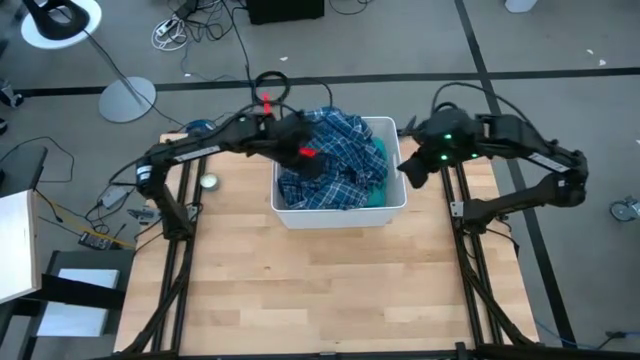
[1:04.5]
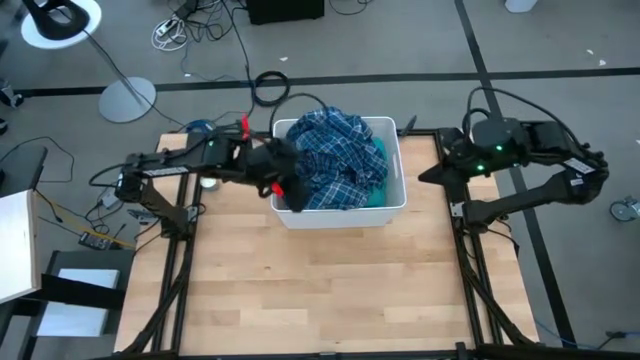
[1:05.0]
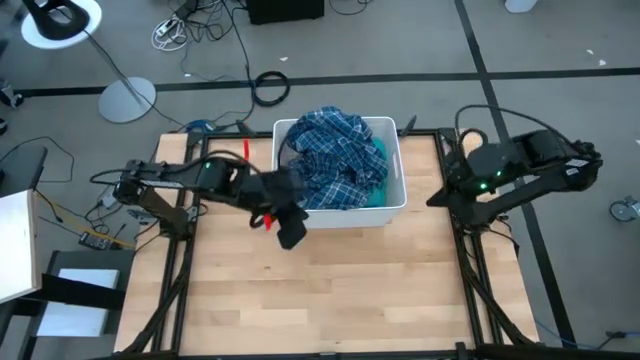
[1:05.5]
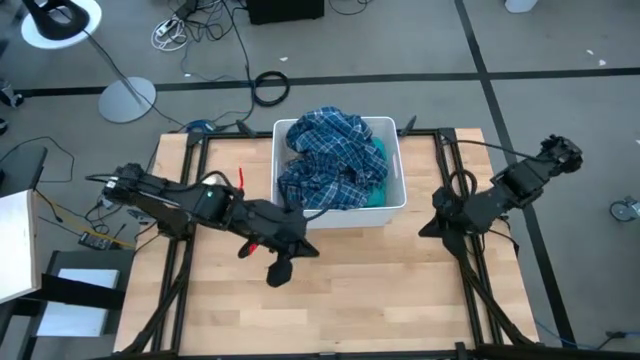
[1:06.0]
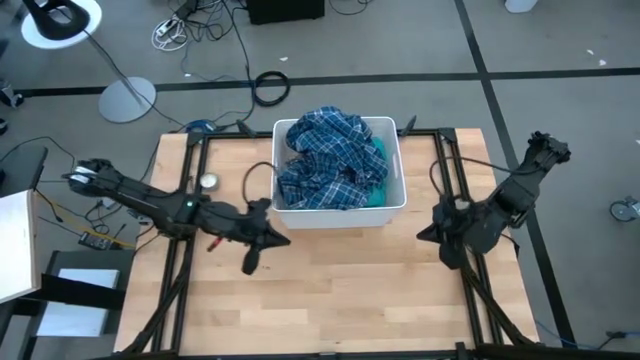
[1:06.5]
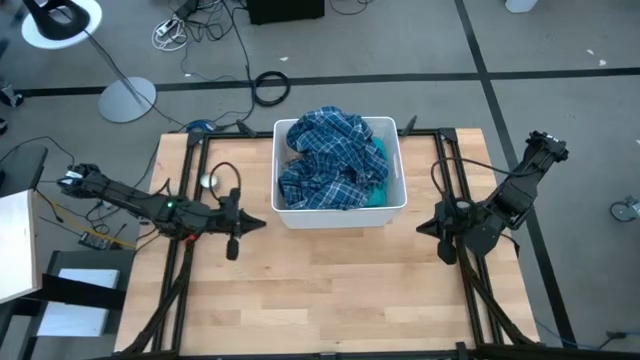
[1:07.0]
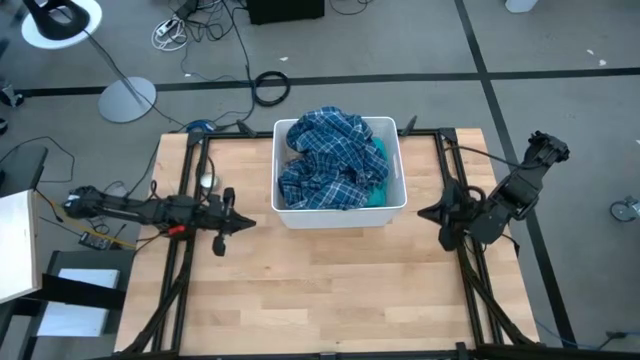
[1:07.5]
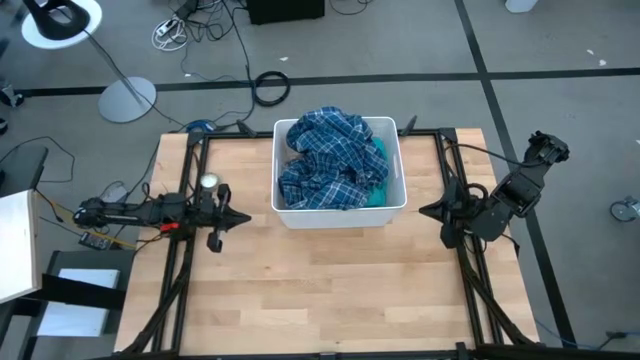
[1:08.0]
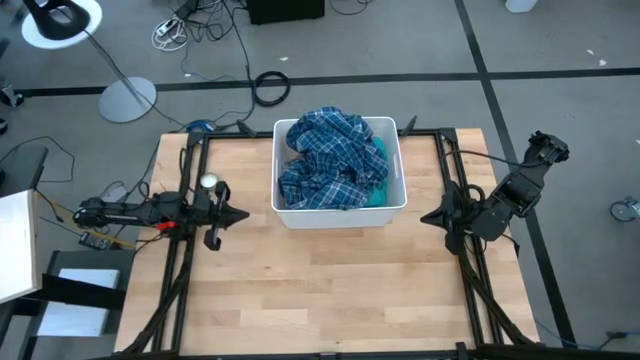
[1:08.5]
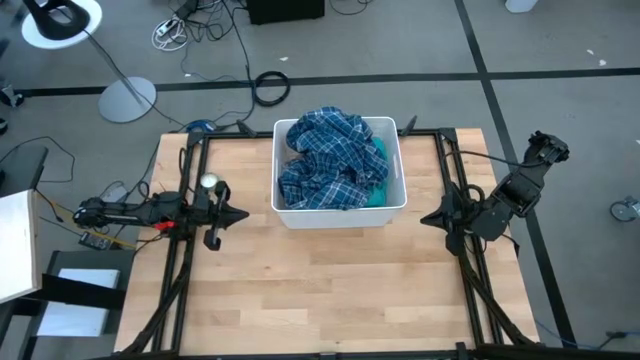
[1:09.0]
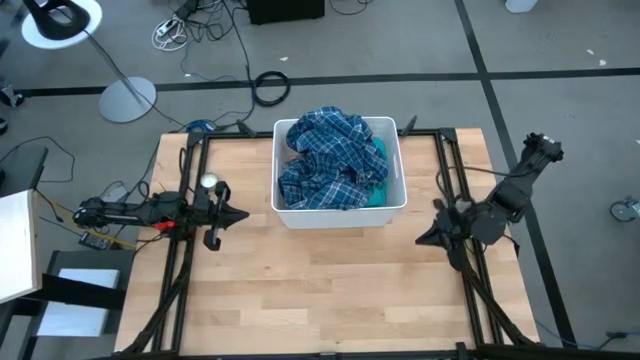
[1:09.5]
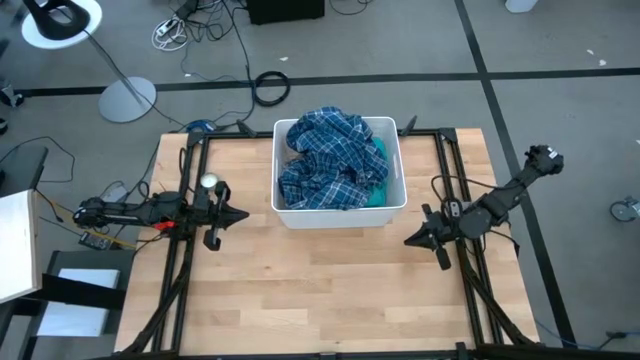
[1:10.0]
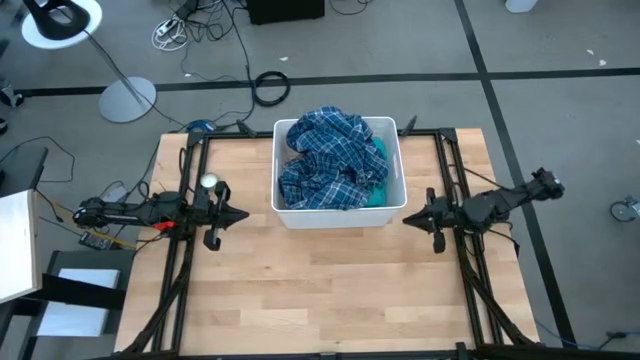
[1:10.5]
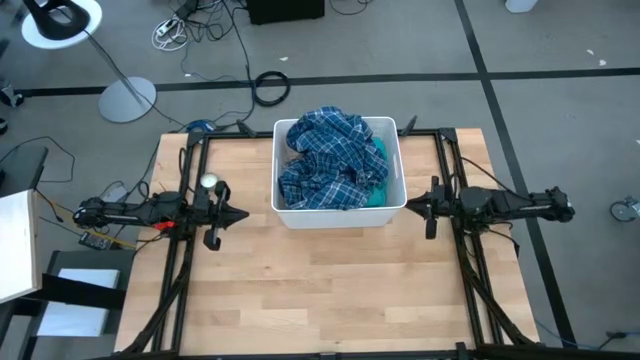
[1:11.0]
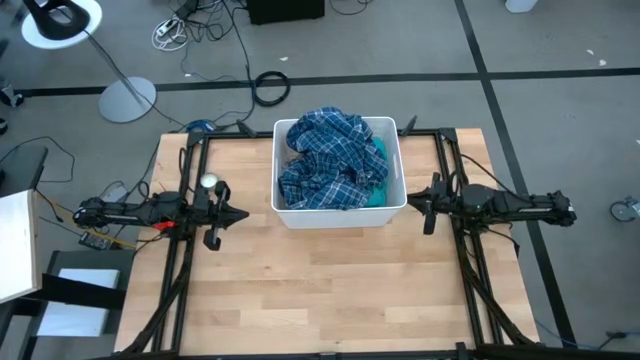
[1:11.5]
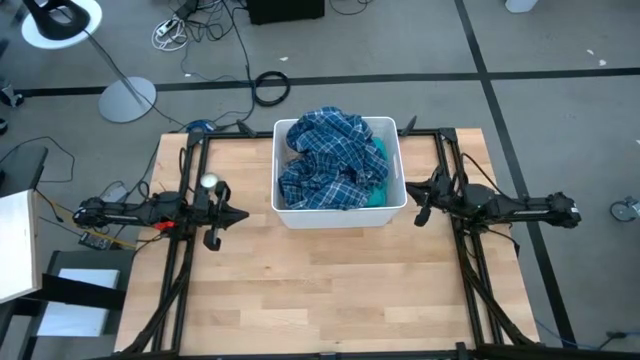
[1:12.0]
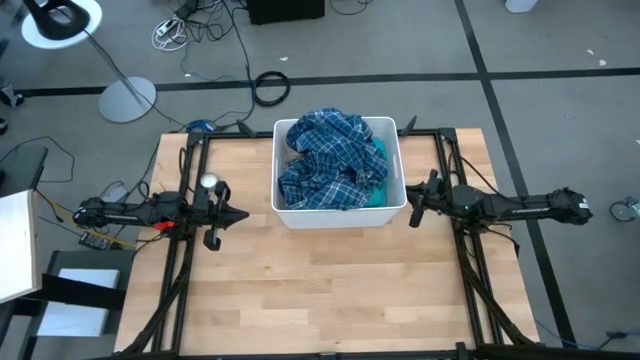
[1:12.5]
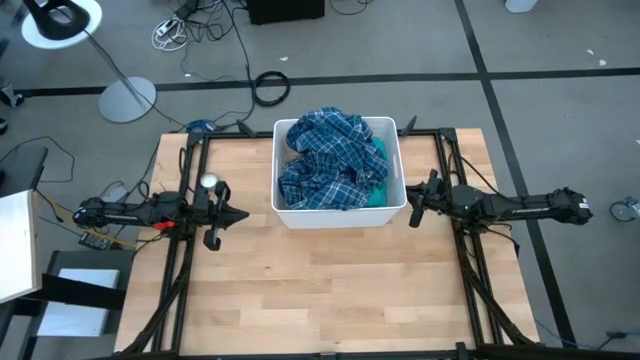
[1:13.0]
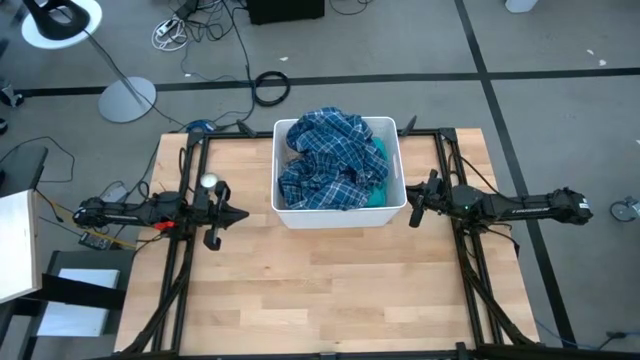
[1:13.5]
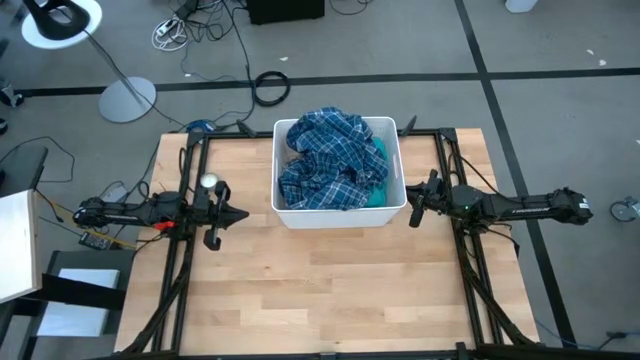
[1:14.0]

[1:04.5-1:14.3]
Task: Sort clothes
Return to Home Position

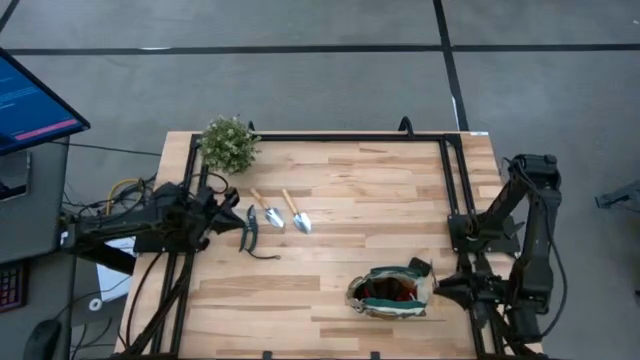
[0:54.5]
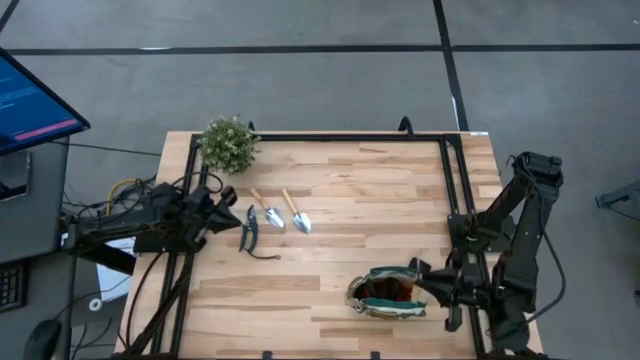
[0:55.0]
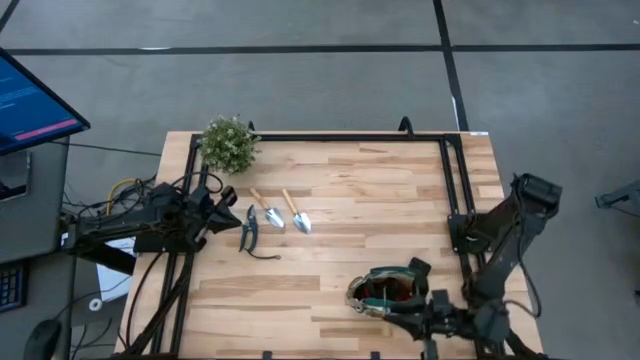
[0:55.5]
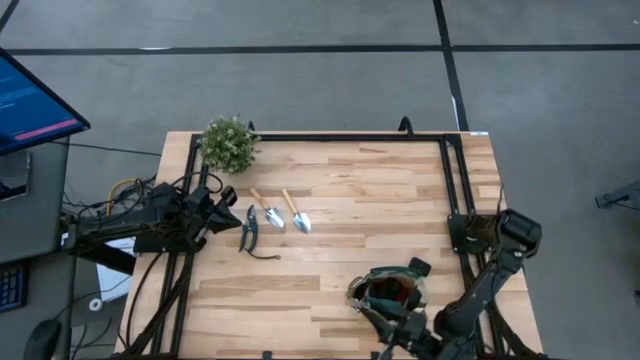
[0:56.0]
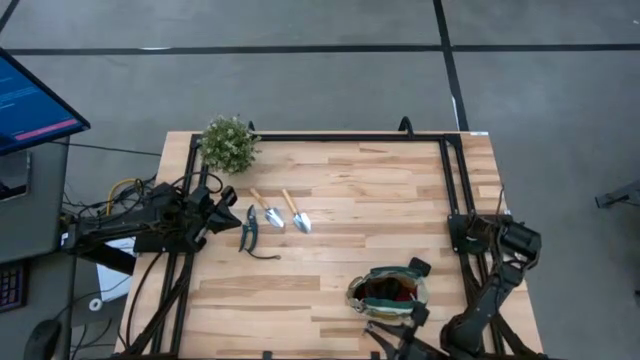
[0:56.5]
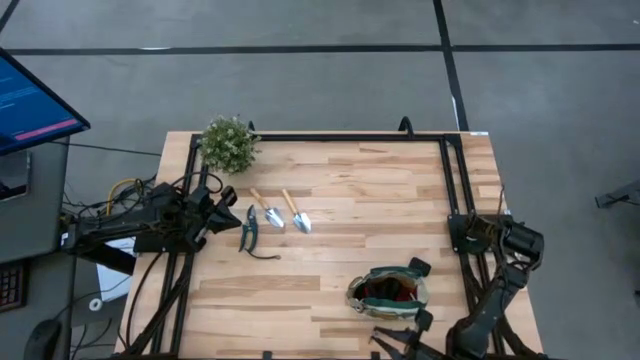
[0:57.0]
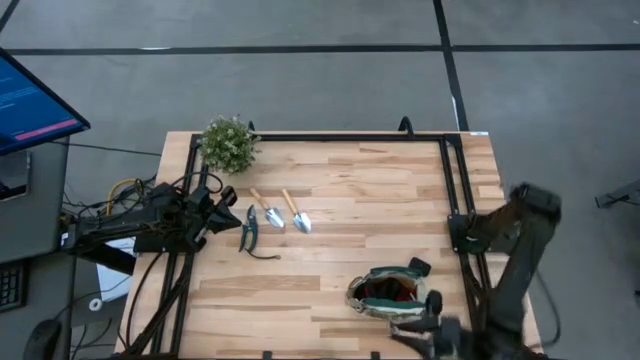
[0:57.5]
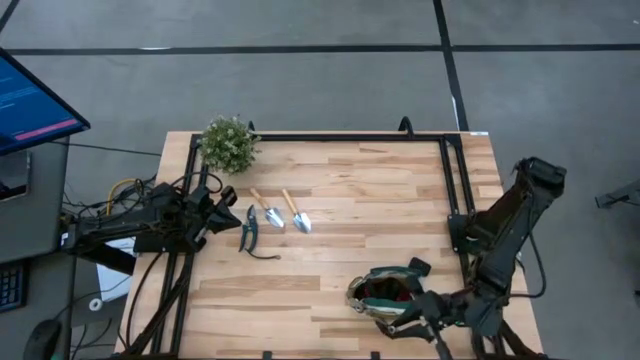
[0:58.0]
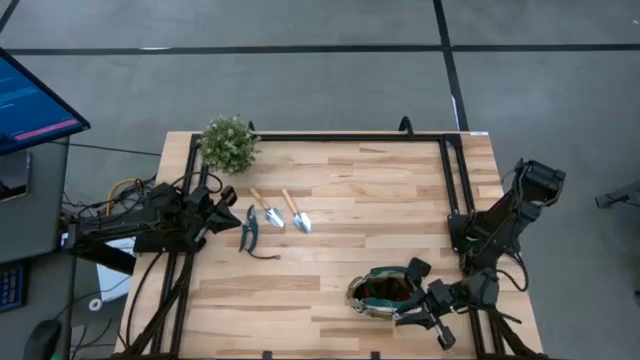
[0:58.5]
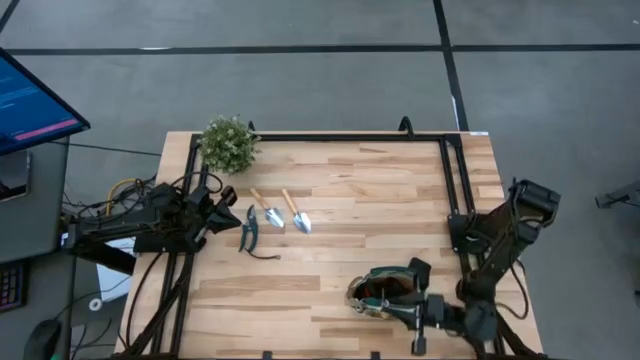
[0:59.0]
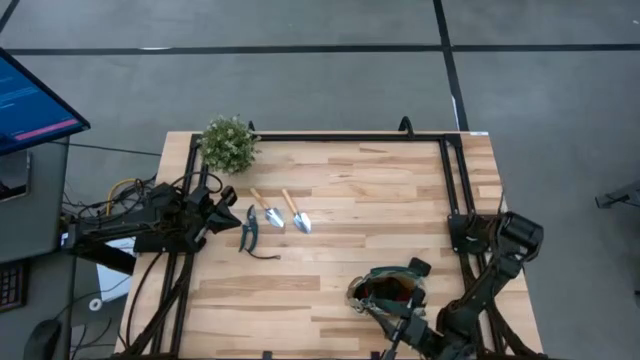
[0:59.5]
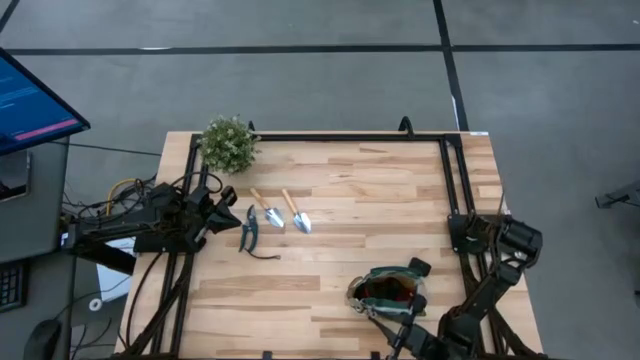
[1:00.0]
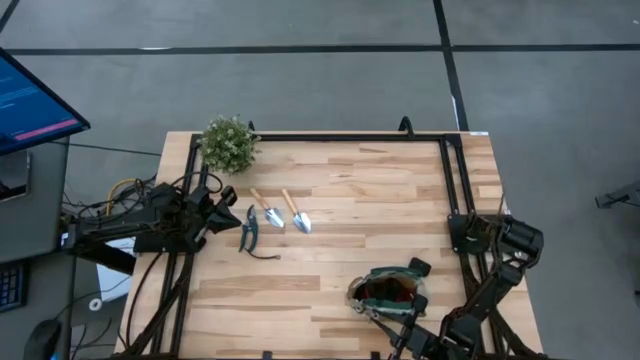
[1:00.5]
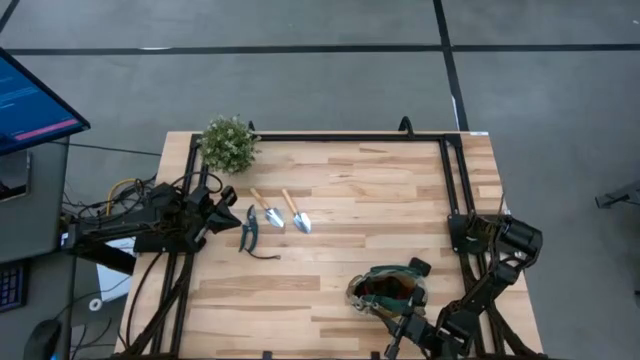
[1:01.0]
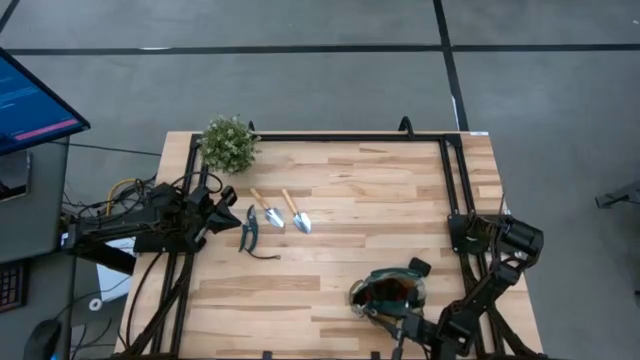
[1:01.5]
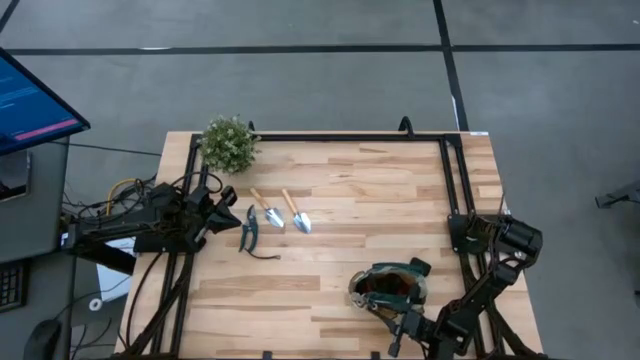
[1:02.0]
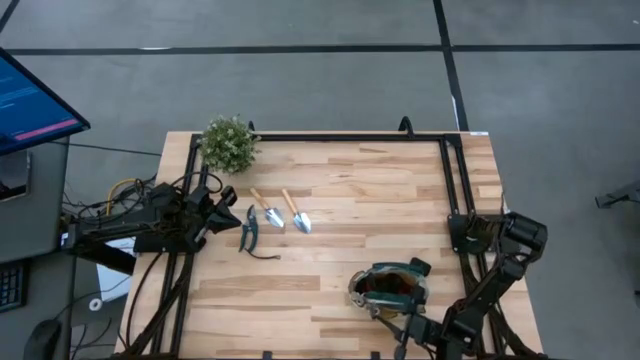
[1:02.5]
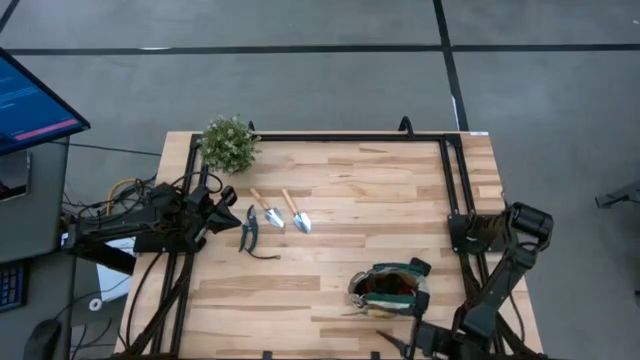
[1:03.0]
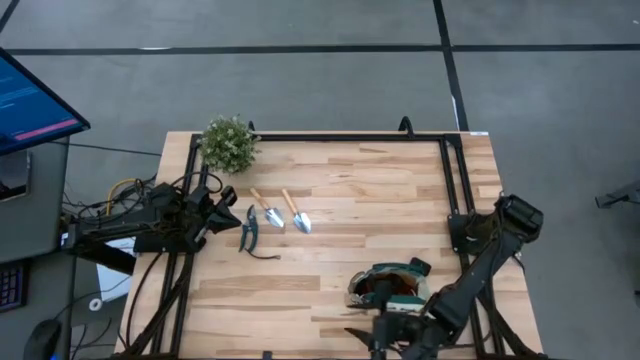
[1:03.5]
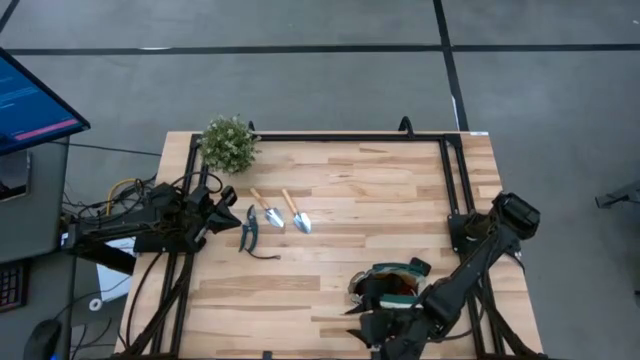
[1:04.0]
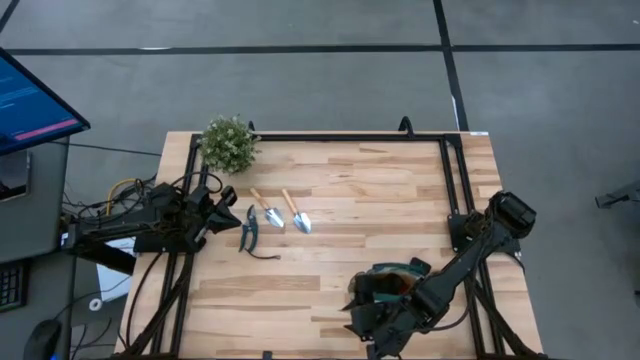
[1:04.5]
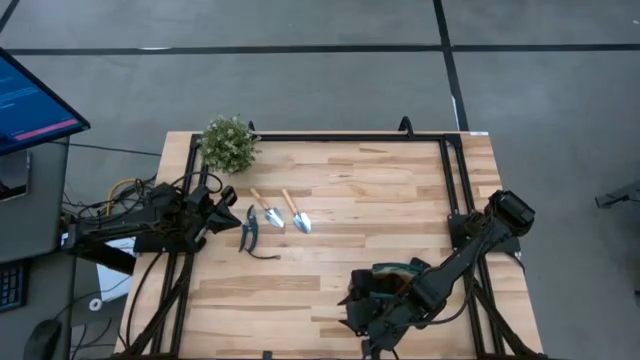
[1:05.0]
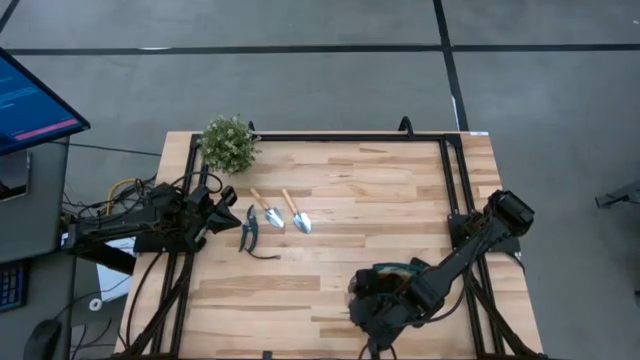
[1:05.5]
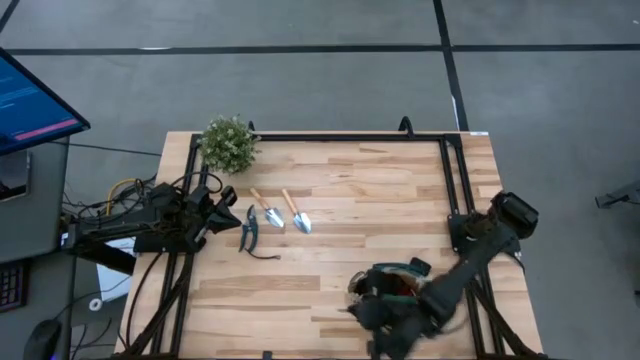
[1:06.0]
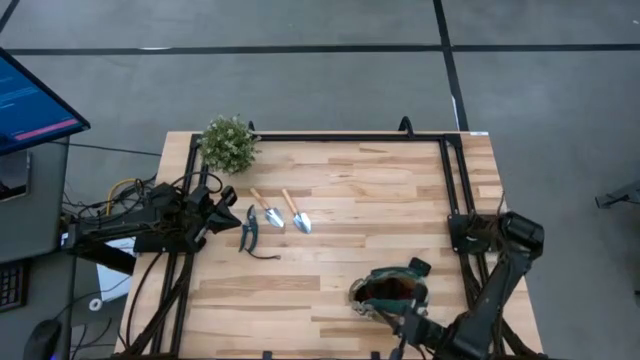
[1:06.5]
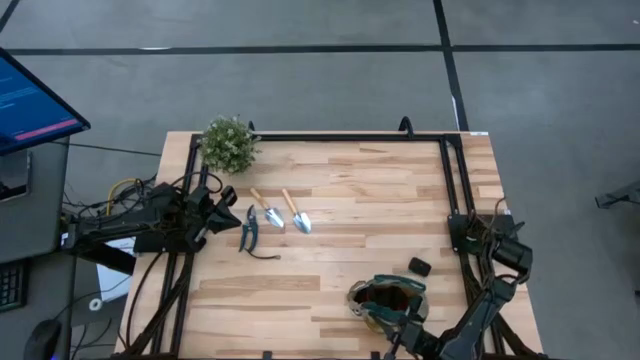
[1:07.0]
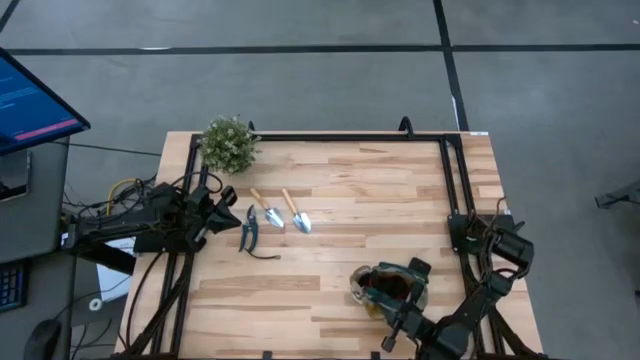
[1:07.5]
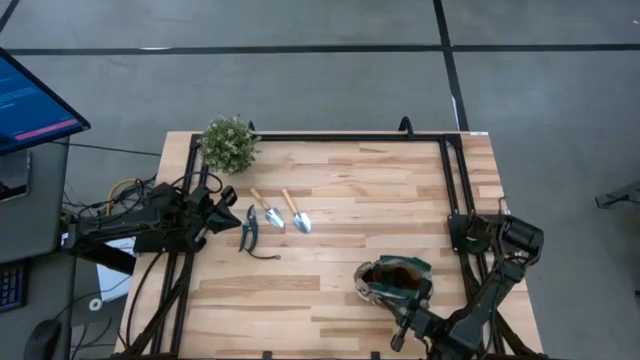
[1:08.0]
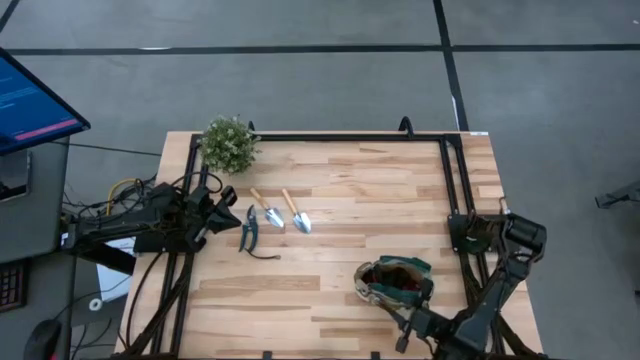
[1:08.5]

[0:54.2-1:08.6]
Task: Pick & Place Garden tools in Gardening bag
Put the brown trowel into the gardening bag
